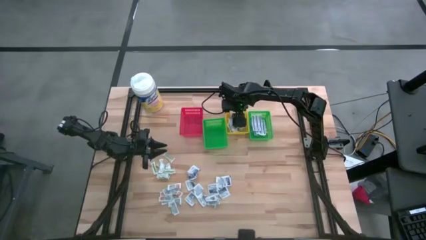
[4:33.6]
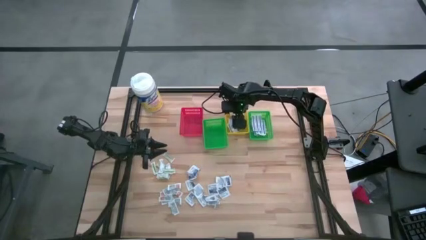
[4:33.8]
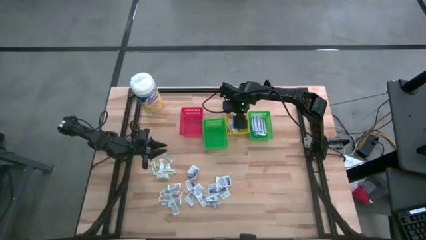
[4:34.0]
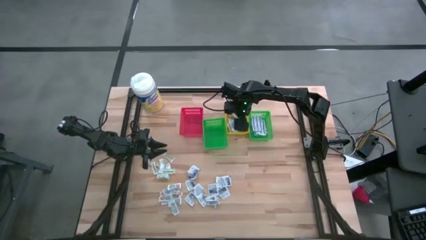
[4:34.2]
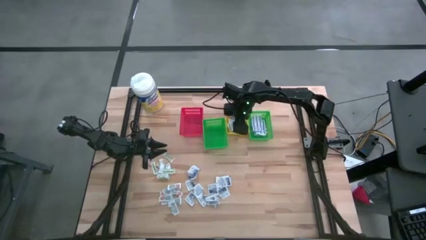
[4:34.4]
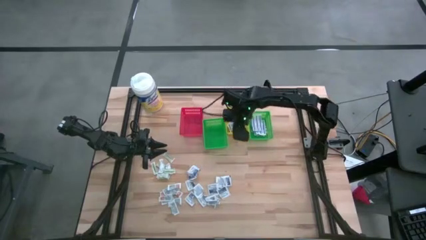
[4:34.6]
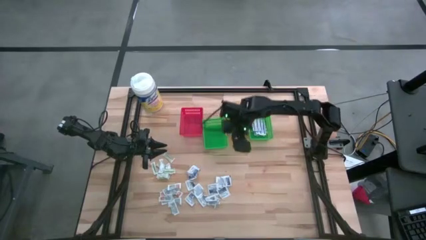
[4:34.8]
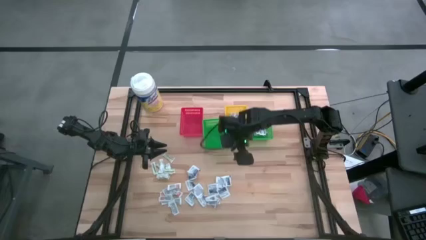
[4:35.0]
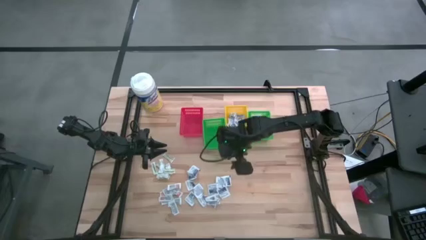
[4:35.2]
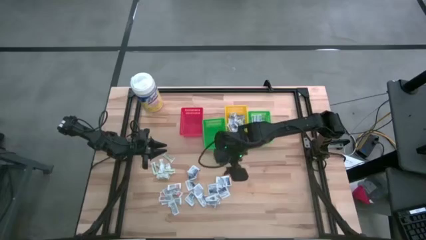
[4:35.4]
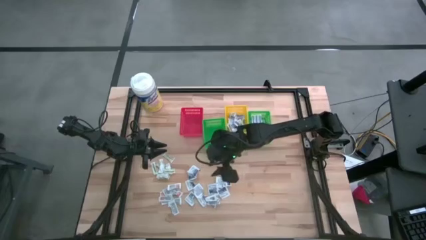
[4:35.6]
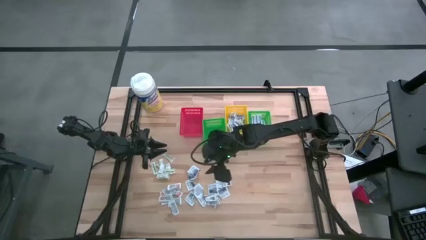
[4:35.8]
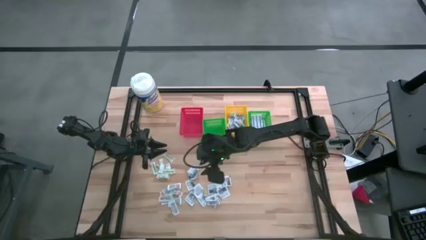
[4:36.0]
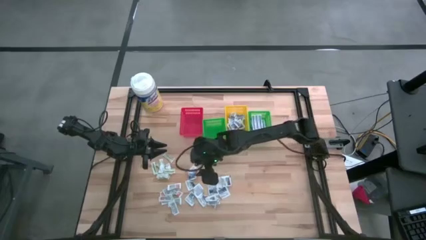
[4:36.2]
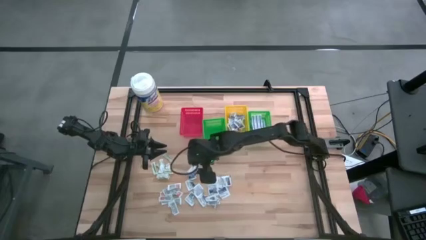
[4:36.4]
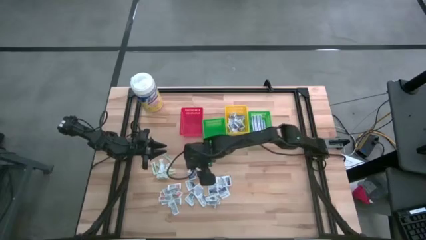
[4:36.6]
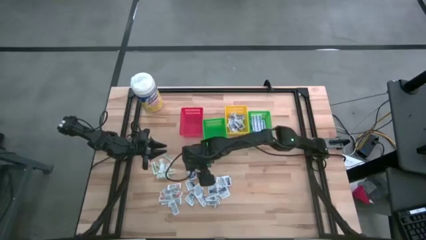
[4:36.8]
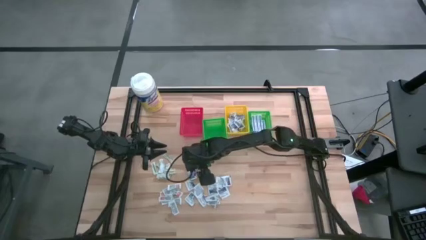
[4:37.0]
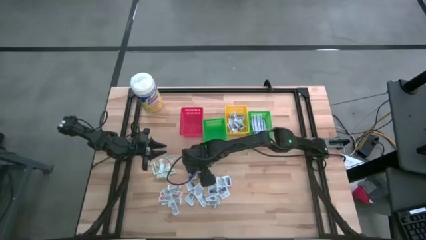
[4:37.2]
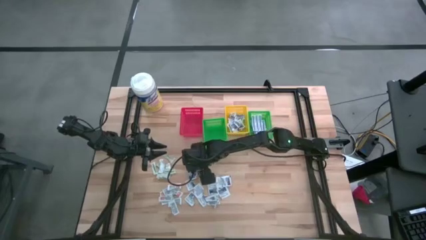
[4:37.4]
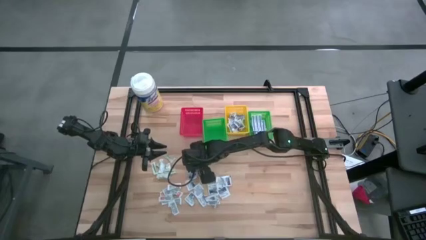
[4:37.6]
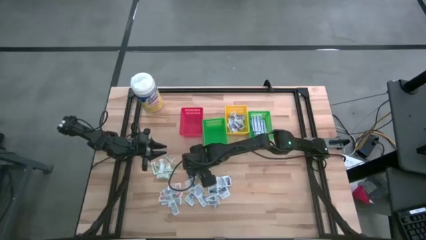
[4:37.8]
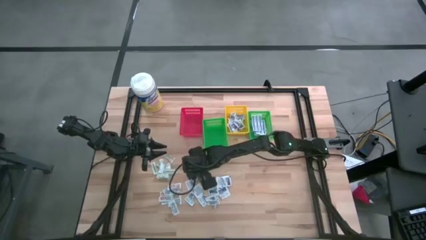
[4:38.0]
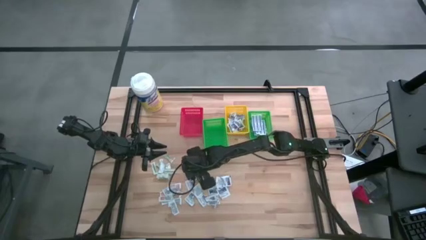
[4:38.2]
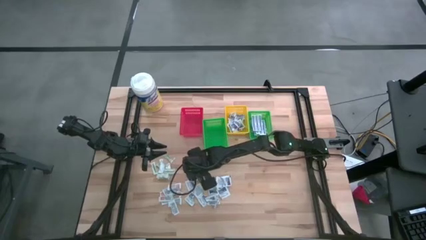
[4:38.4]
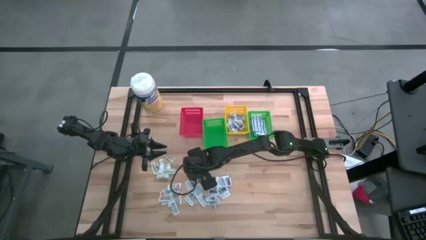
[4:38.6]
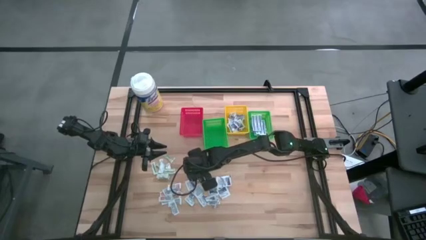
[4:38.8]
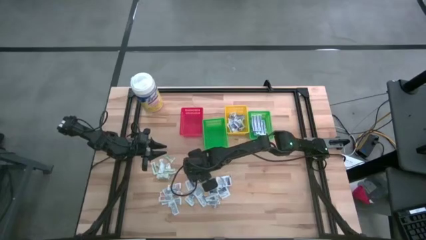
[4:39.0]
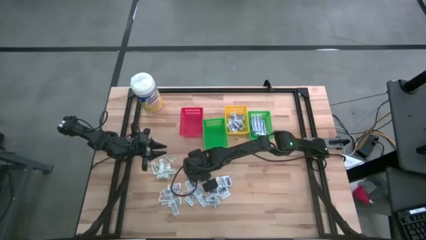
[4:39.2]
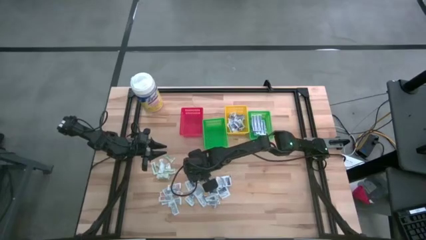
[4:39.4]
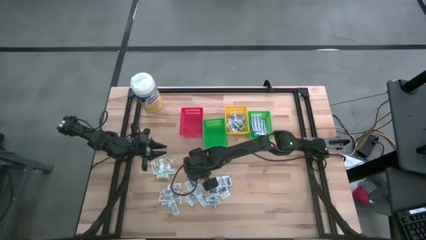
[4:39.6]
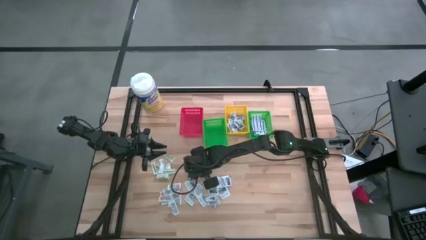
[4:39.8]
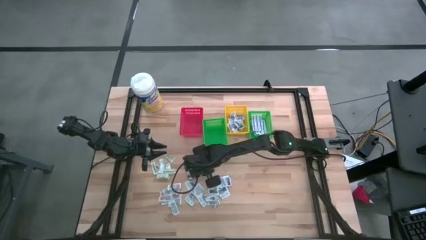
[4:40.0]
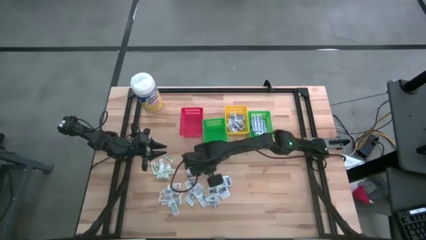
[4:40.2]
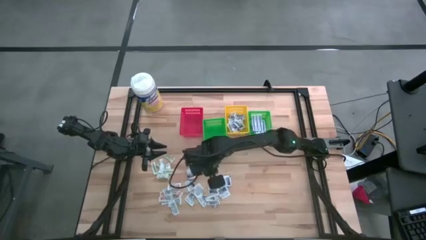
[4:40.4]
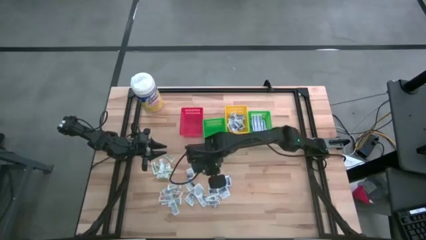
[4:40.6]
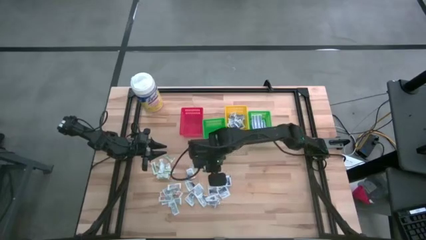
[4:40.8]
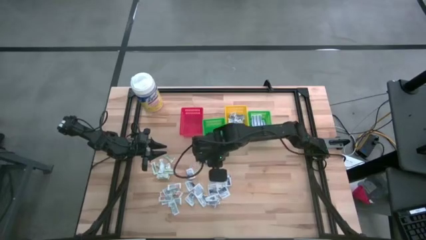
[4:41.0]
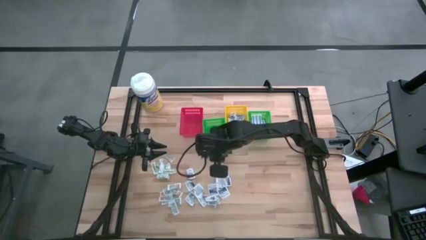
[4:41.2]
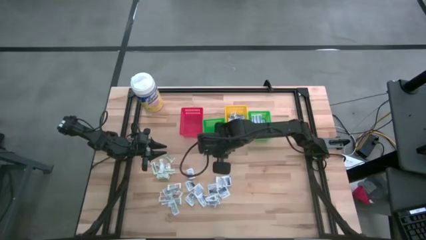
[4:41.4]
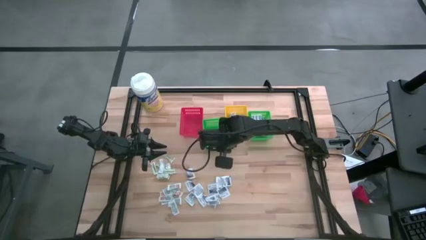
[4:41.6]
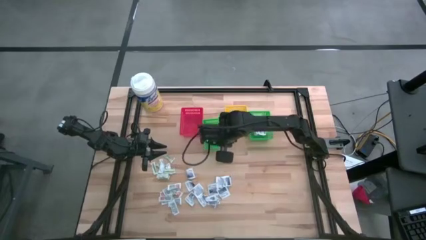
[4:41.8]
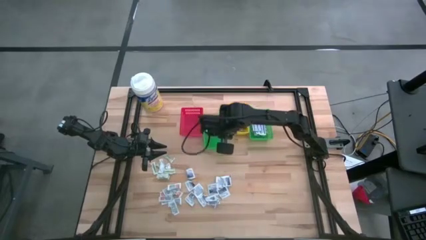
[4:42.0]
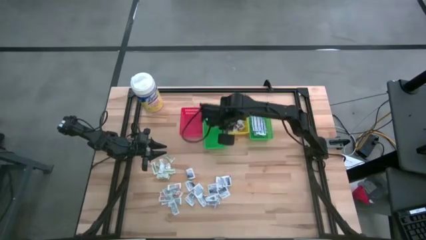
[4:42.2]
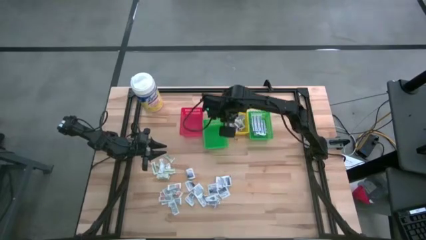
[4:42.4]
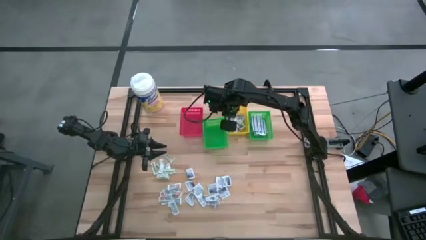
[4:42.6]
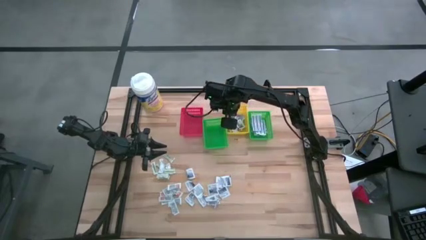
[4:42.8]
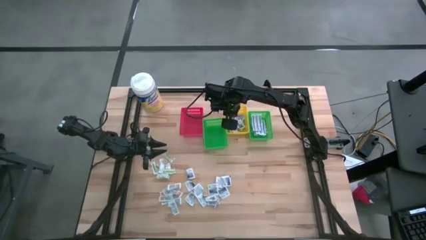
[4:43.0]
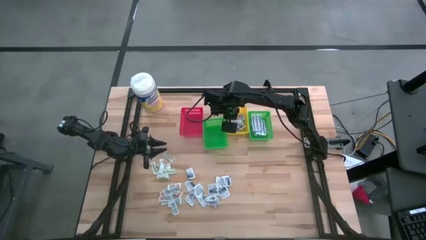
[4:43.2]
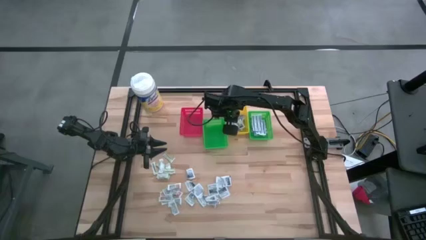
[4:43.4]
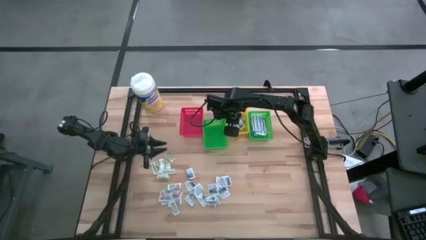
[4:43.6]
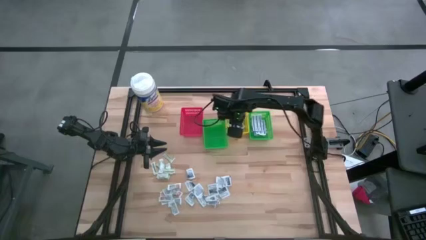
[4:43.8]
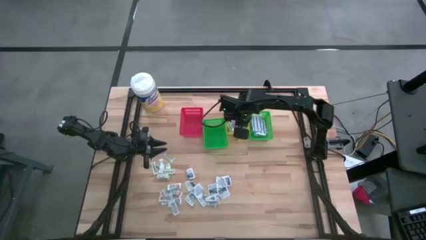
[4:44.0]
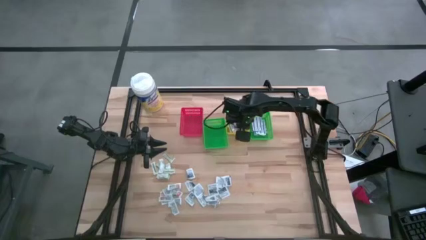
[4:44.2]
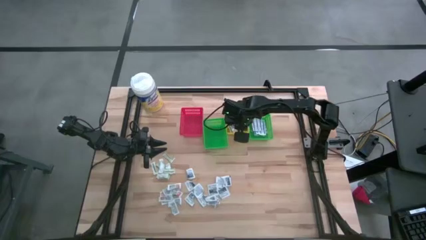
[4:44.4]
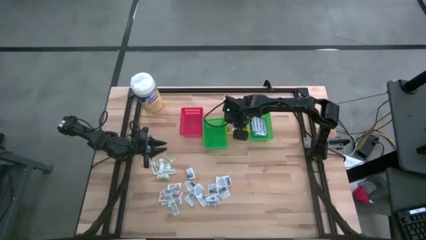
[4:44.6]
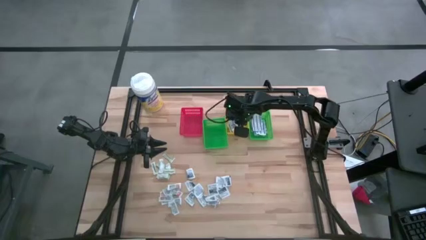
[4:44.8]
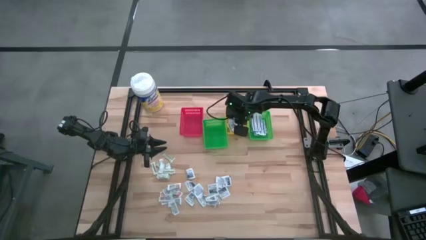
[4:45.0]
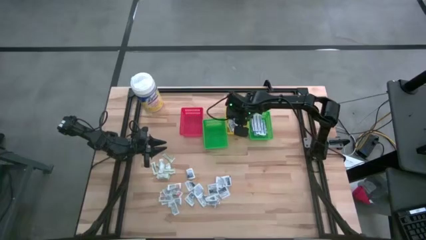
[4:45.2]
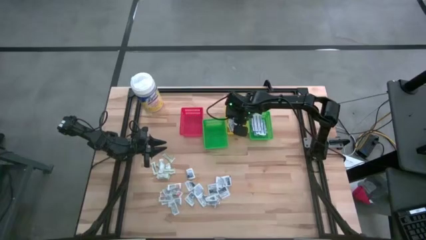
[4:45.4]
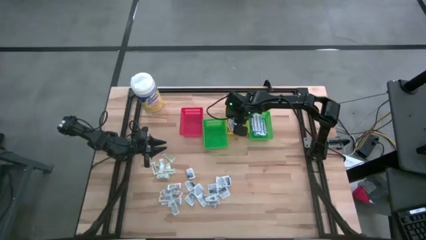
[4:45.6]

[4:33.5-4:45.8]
Task: Pick & Place First Aid Supplies
Put the alcohol pad into the yellow basket

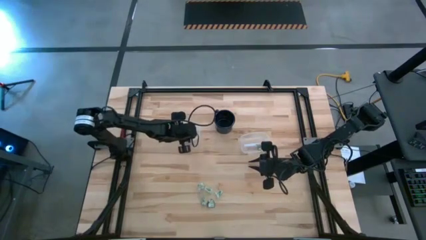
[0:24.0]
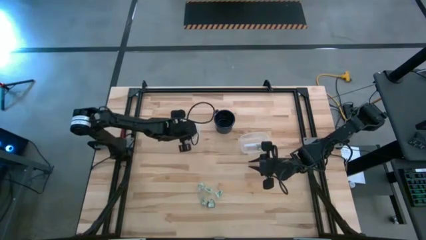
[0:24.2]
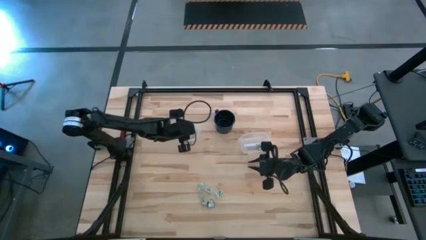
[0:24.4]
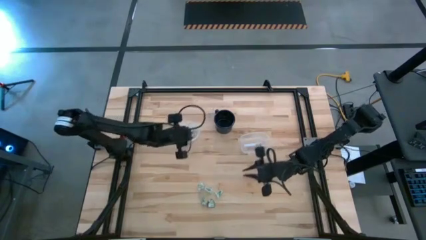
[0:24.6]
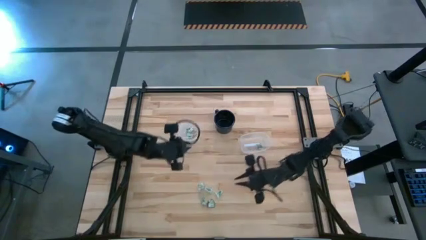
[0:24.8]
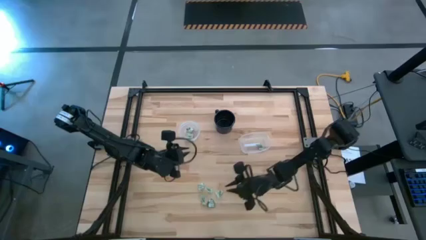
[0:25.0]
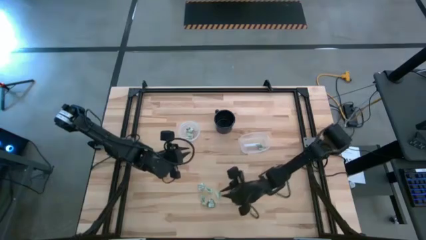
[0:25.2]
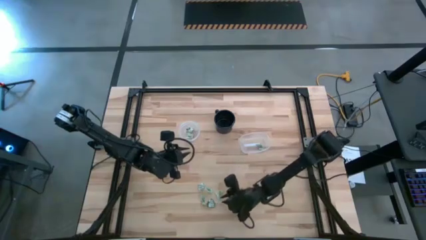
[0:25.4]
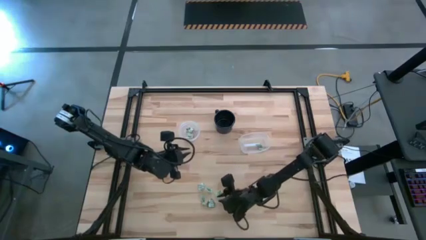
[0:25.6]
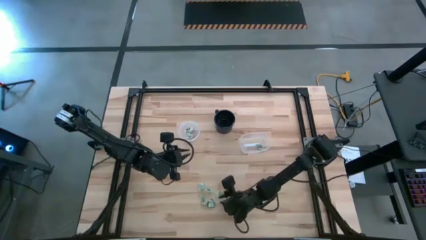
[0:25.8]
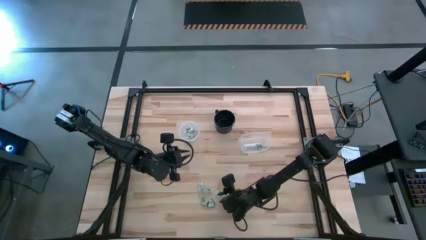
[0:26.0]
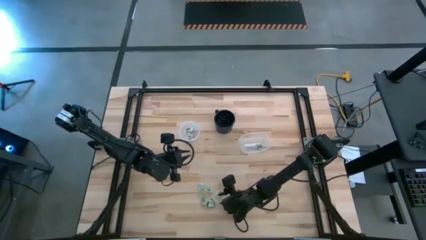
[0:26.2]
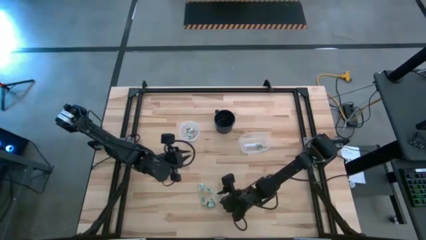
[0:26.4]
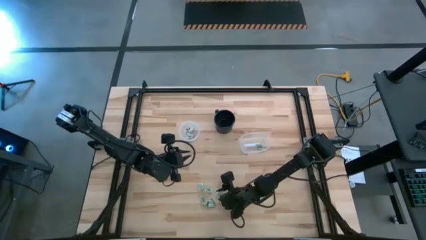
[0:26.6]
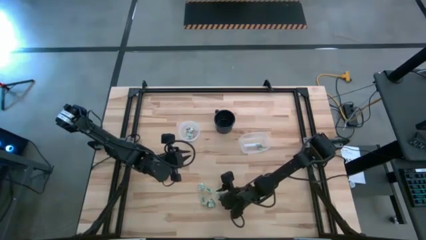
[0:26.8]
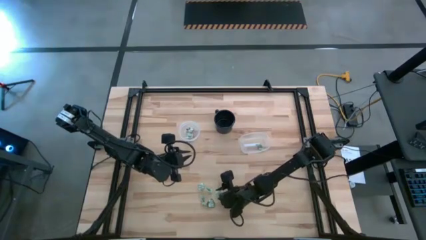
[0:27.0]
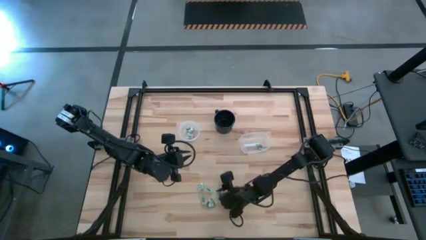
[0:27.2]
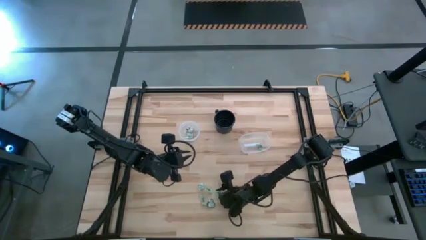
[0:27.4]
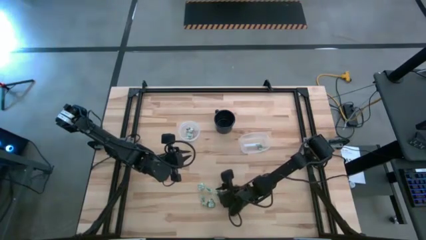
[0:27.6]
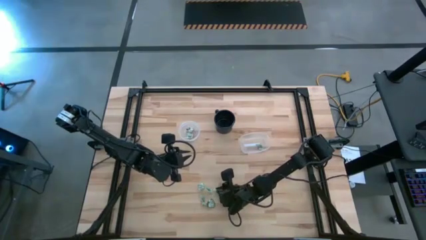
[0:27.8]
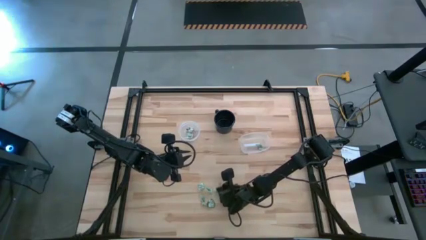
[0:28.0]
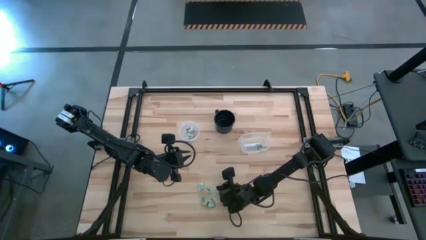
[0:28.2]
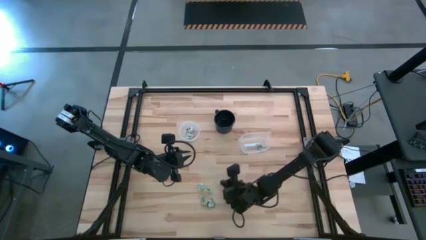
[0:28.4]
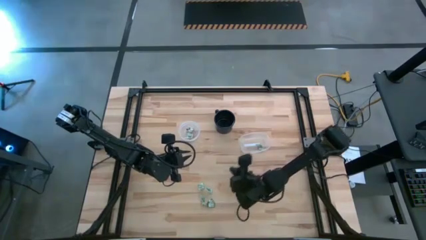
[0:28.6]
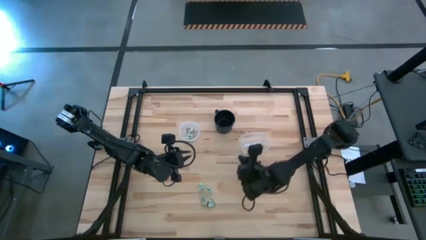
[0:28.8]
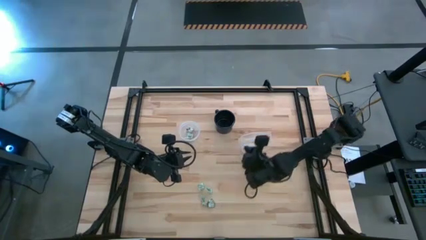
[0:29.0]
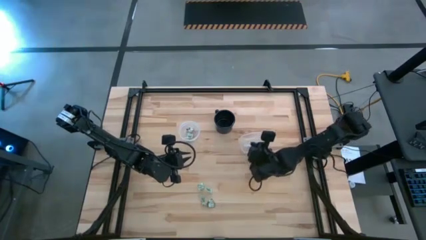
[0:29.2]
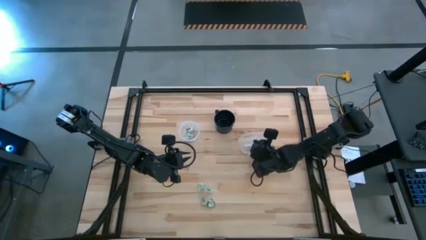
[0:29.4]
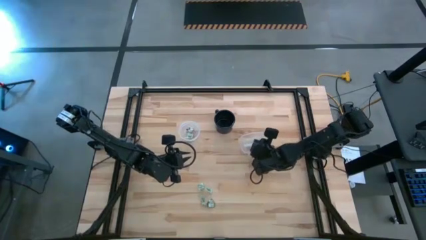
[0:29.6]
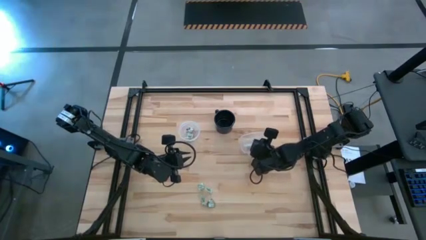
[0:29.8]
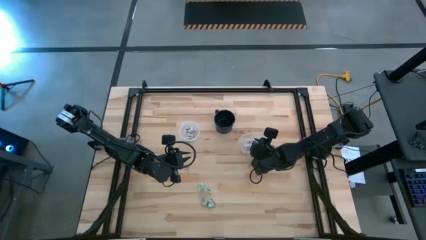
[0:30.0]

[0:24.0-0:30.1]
Task: Pick and place items into bin
Put the stevia packet into the right transparent bin
